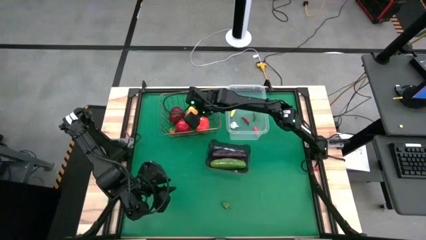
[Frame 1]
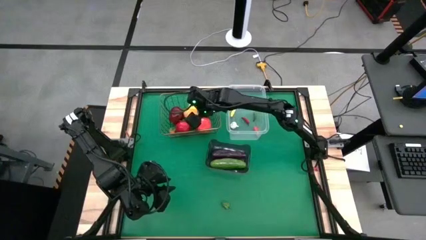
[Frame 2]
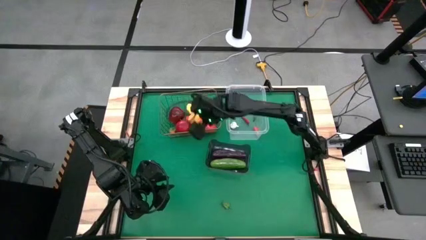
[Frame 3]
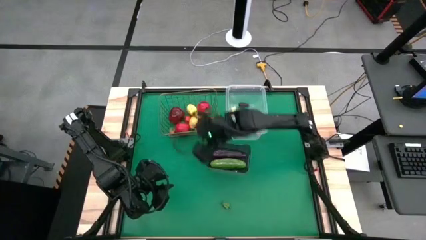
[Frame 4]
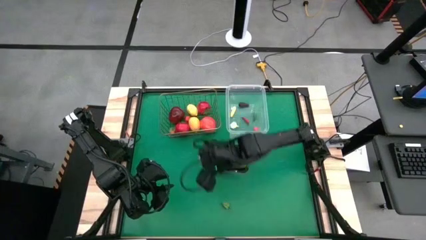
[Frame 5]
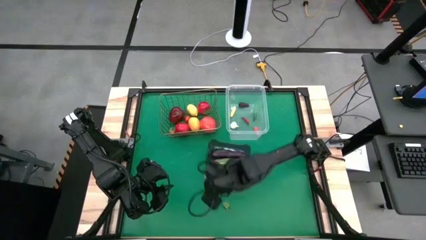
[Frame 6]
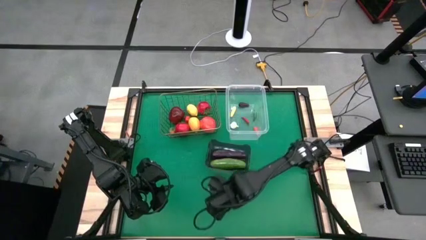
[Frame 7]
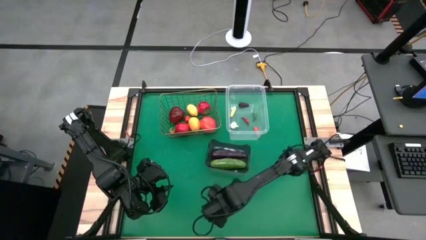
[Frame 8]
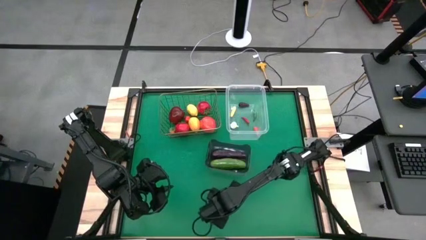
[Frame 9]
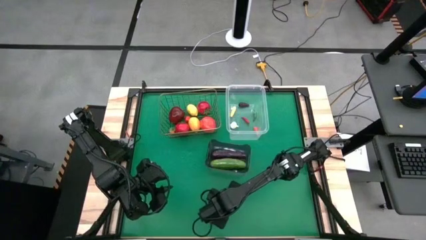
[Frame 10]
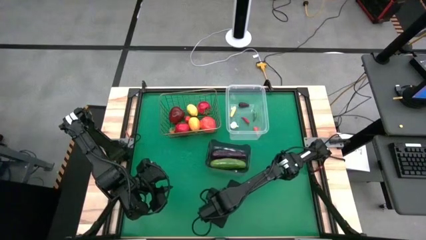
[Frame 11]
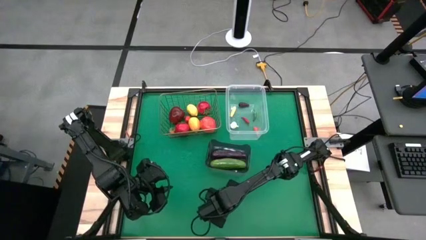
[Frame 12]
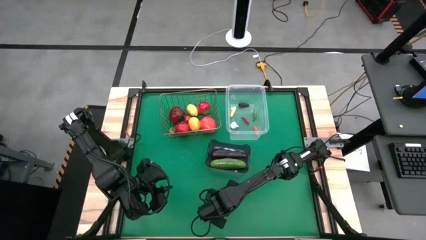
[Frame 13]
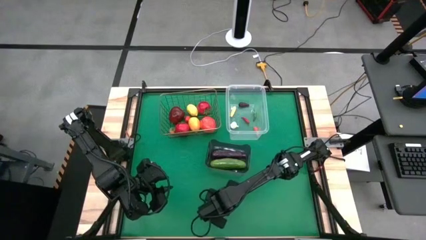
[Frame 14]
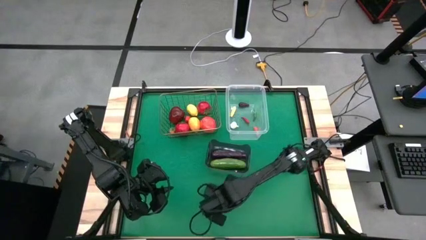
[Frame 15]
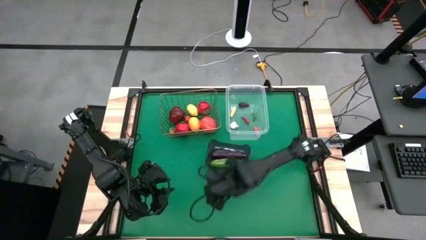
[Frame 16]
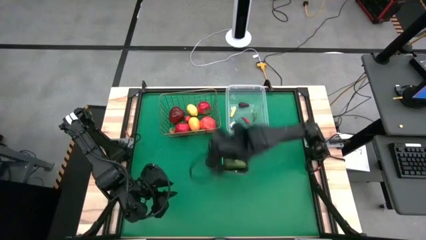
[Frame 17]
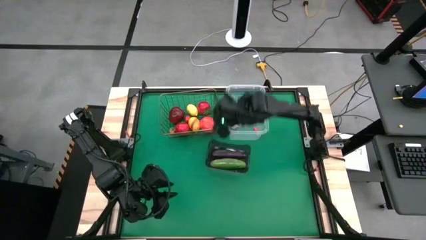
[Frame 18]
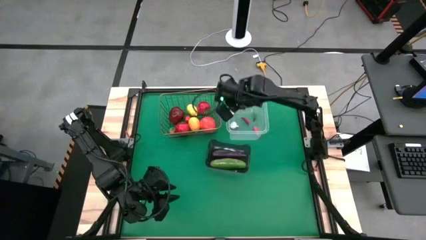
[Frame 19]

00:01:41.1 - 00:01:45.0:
Task: Sort produce into baskets
Put the green bell pepper into the transparent bin

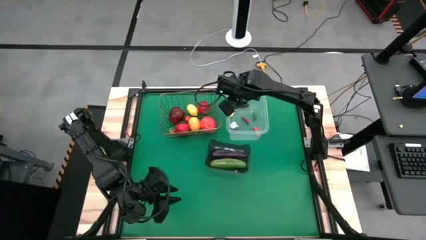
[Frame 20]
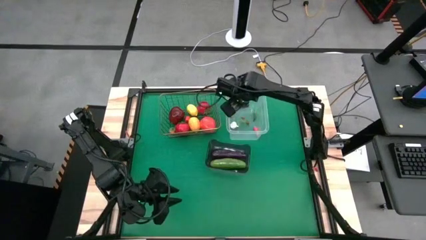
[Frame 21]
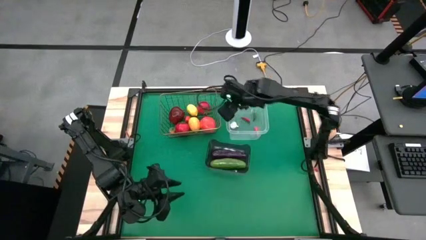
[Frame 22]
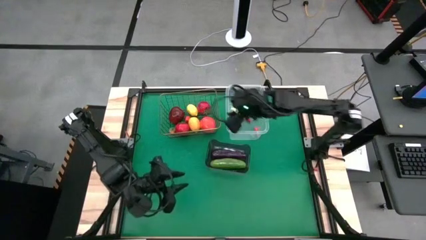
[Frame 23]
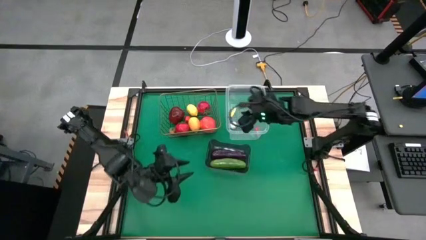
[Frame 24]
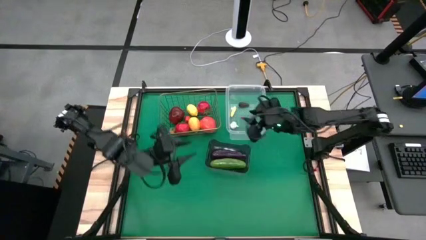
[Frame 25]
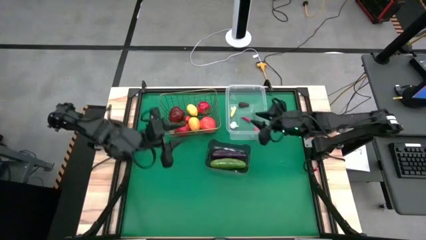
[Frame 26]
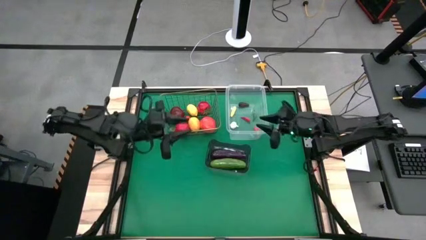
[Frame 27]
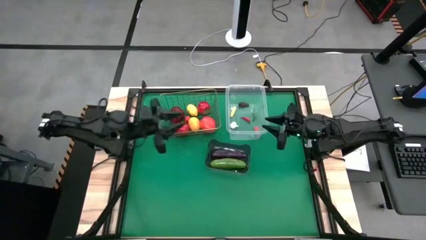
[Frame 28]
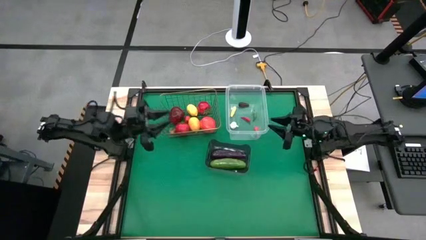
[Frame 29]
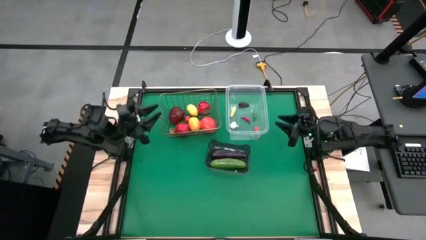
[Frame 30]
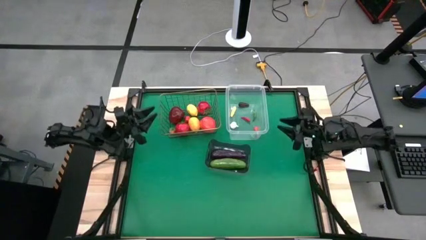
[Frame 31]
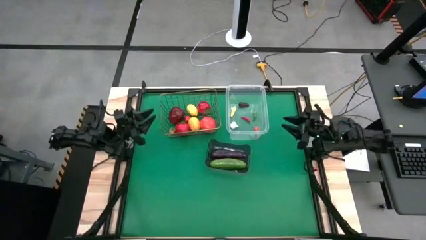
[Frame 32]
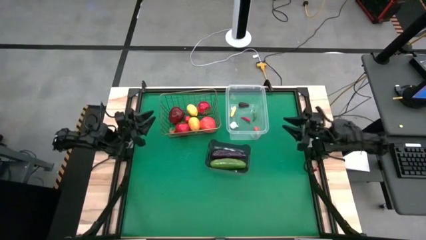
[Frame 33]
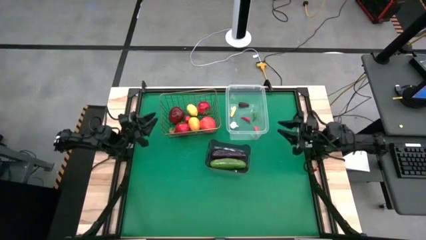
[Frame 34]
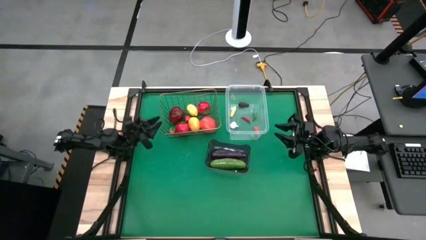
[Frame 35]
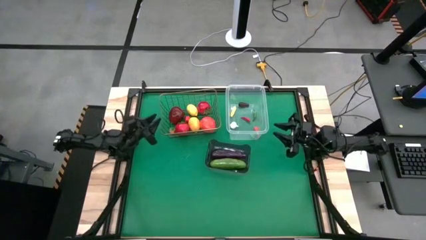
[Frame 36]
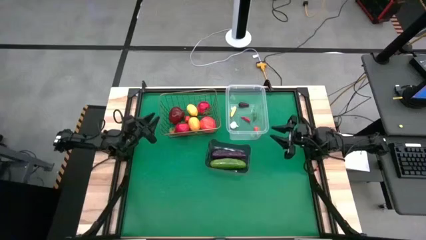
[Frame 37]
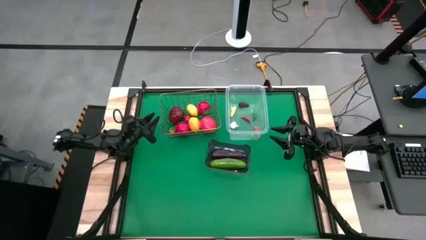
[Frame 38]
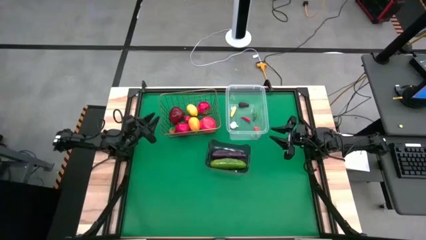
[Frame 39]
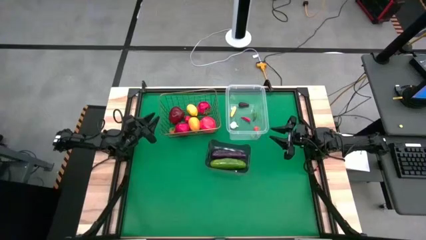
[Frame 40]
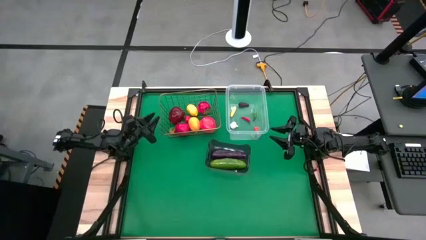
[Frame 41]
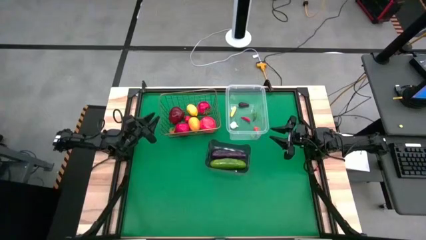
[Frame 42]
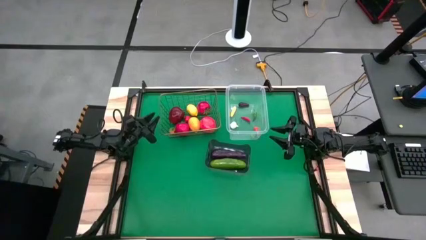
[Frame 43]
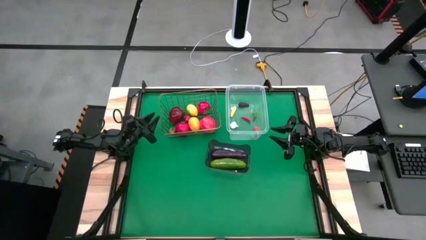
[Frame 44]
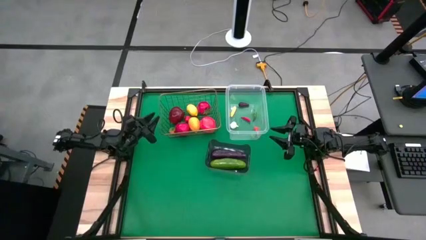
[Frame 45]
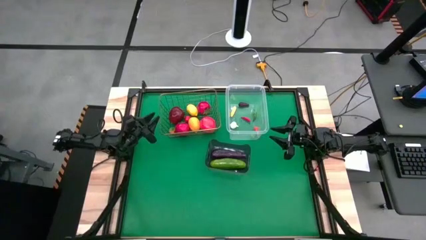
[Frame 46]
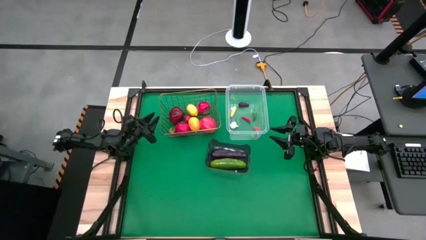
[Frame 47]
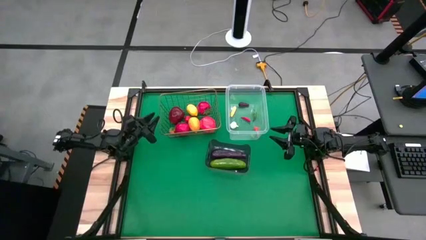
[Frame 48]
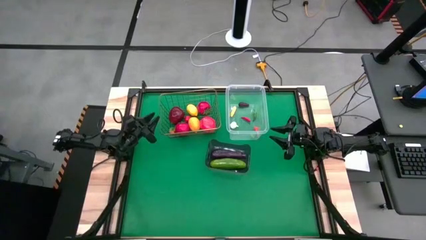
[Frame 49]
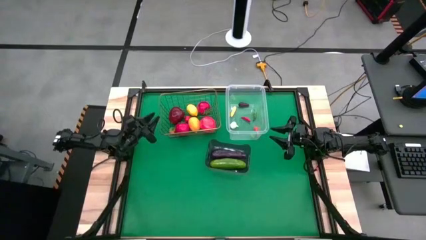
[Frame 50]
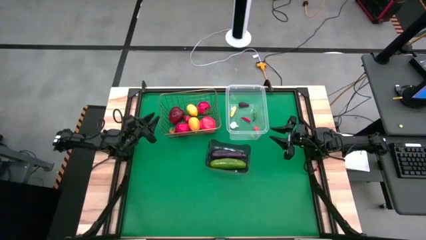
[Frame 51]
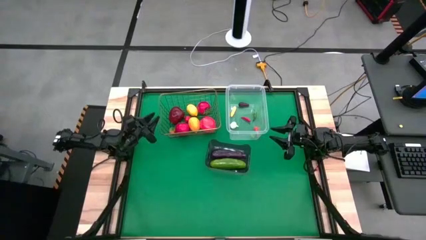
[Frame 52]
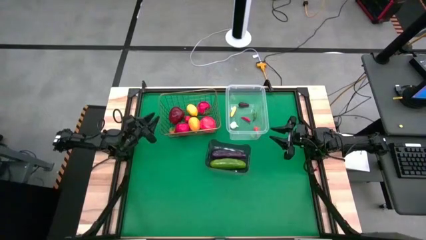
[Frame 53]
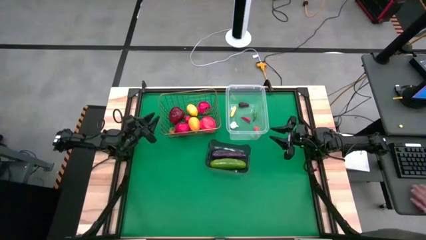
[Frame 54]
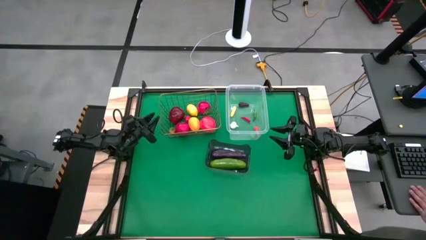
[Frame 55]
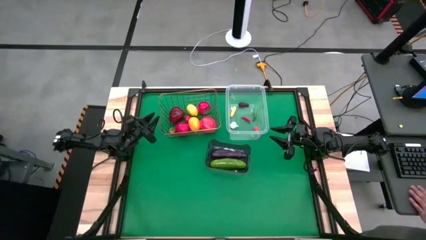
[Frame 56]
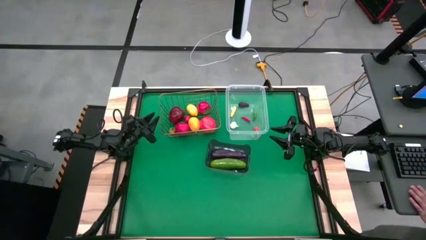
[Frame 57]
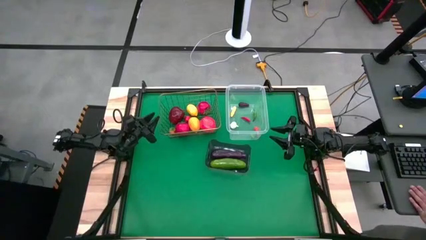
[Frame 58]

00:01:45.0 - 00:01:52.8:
Return to Home Position

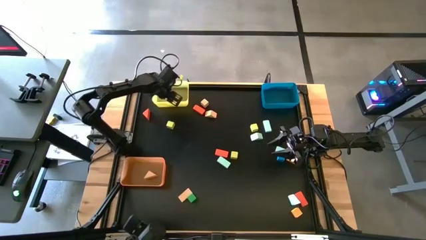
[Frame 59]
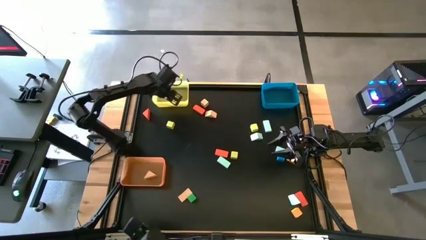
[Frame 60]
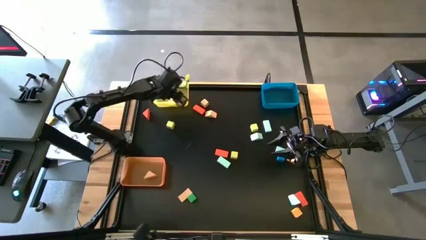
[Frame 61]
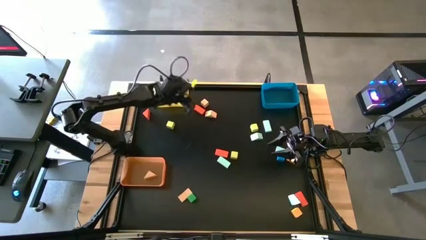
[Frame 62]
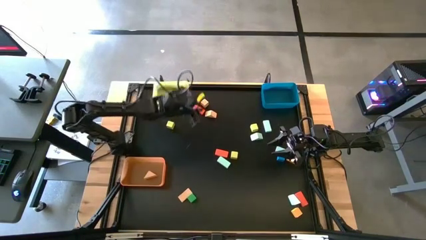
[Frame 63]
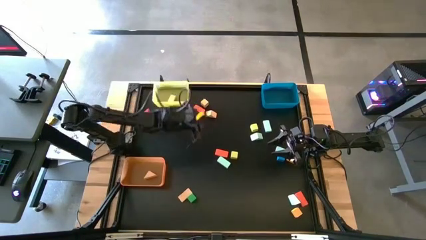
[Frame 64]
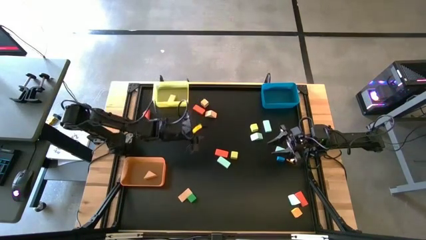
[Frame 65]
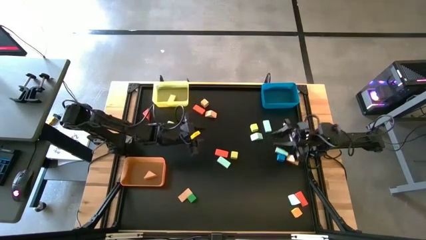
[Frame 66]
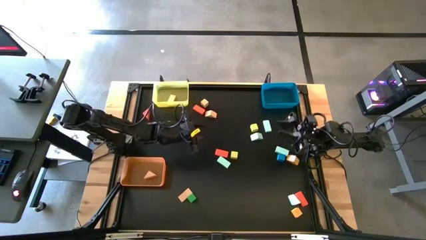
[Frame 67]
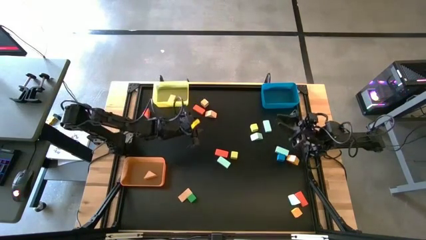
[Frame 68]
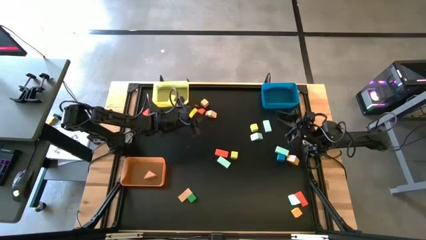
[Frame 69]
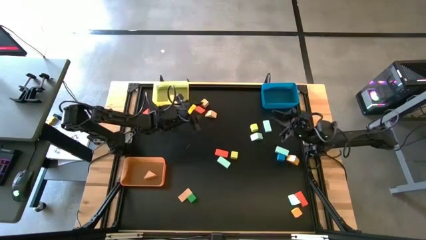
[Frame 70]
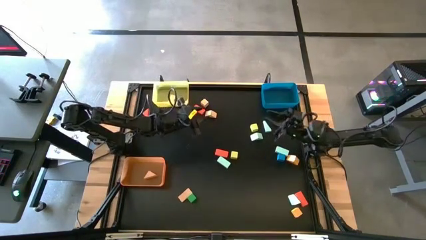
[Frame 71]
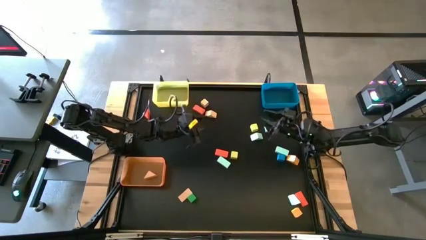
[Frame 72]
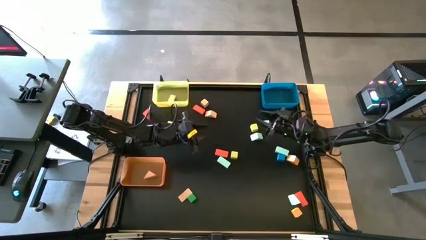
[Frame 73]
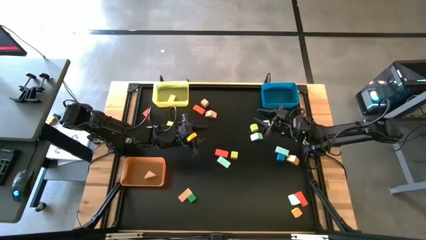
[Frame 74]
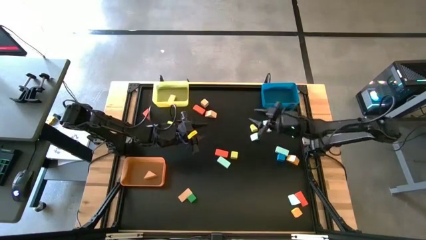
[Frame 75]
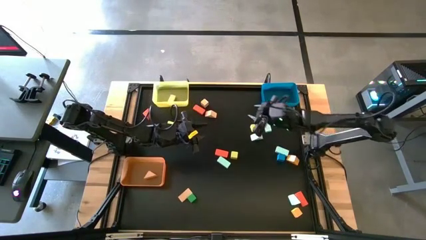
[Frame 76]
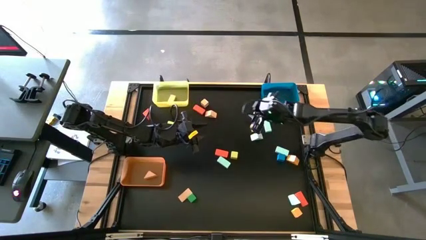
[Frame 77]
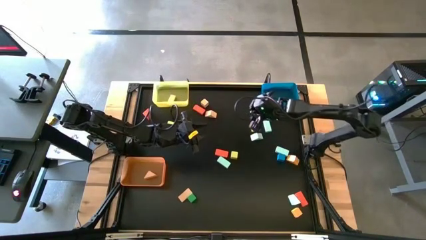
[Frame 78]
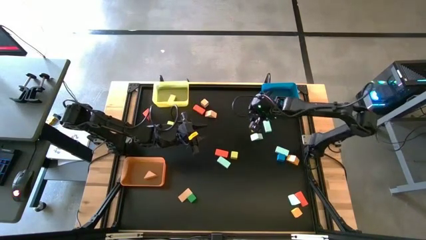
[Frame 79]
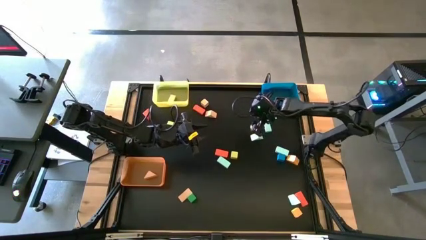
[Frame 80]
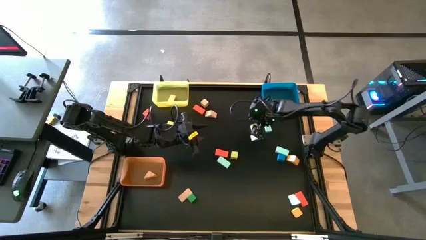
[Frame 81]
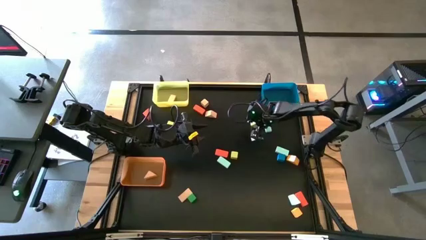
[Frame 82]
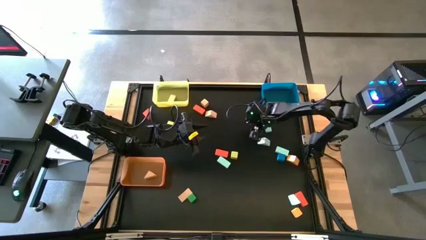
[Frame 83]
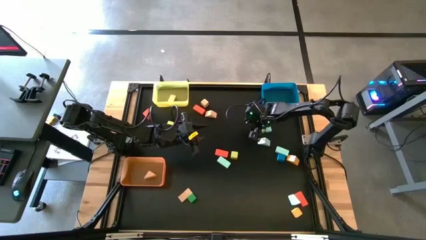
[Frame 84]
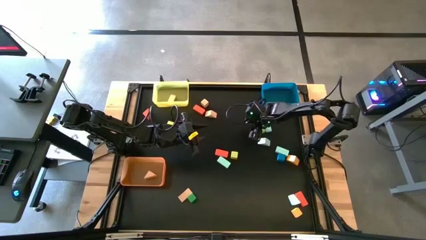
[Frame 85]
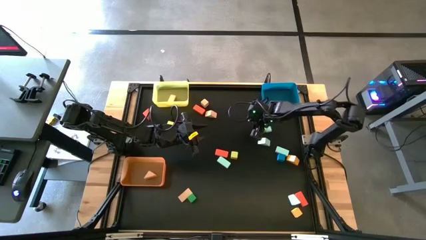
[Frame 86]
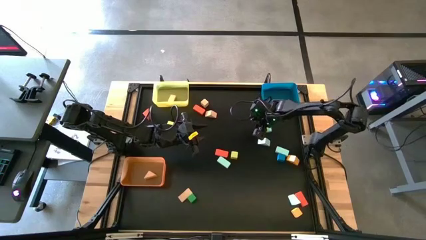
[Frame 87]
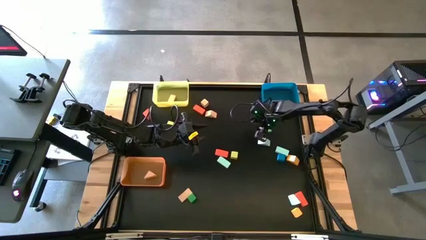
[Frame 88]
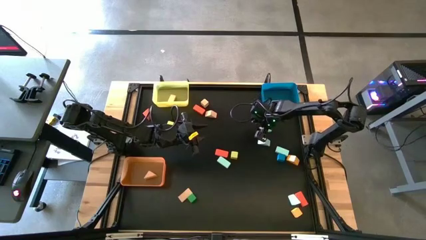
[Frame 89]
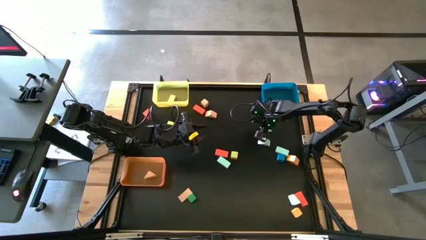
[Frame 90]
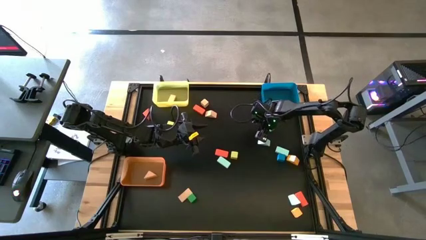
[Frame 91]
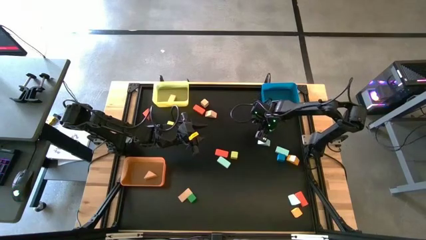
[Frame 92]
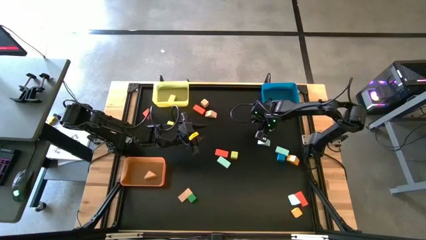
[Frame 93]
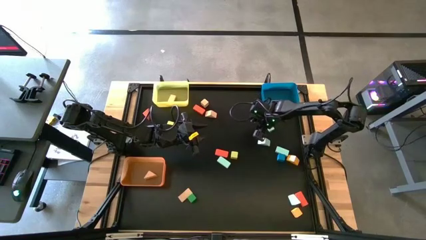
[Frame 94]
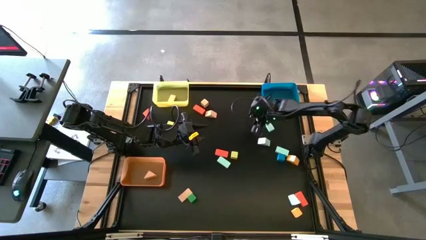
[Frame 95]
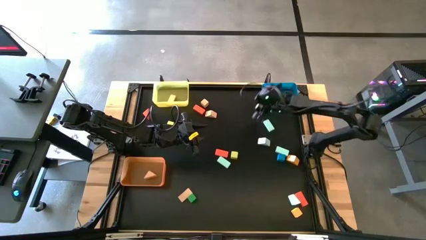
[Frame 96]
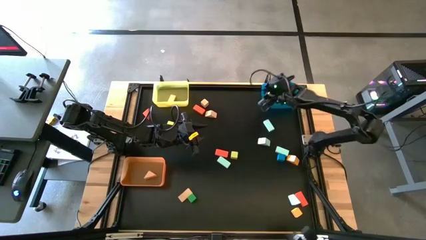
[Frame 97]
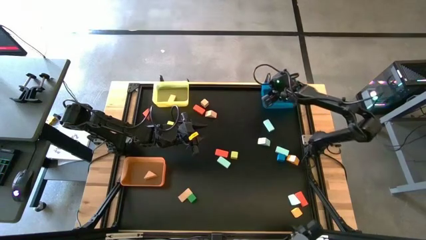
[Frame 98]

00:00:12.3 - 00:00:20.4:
Task: Sort blocks by size
Put the yellow wooden block into the blue bin
